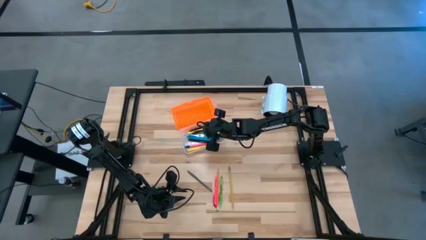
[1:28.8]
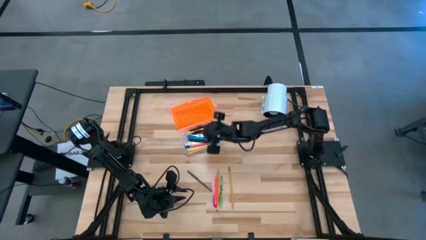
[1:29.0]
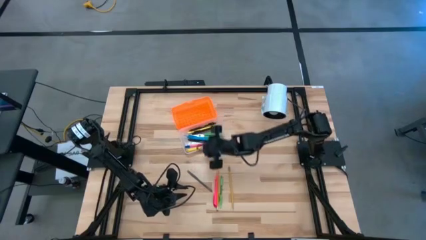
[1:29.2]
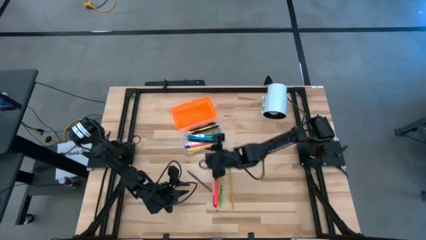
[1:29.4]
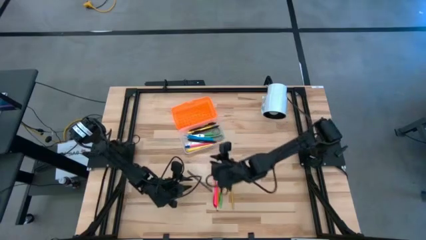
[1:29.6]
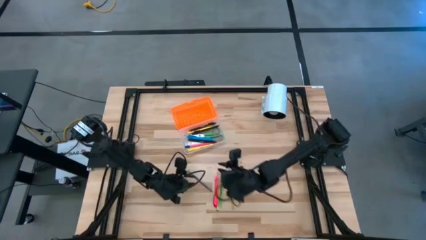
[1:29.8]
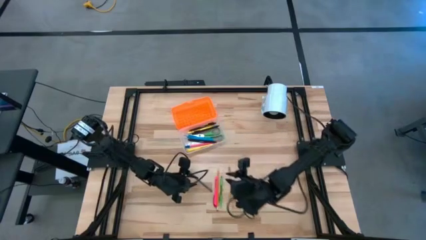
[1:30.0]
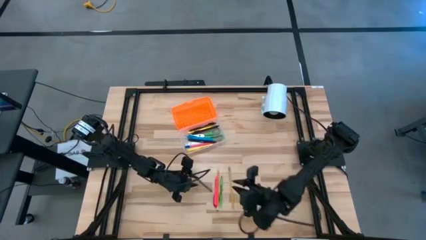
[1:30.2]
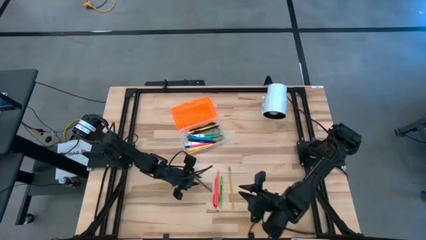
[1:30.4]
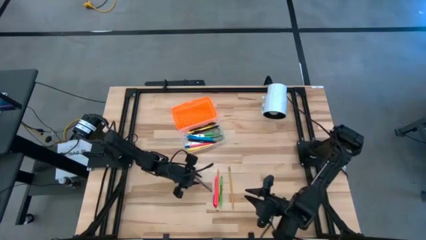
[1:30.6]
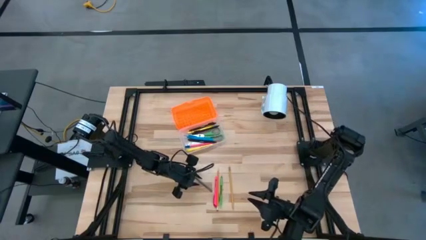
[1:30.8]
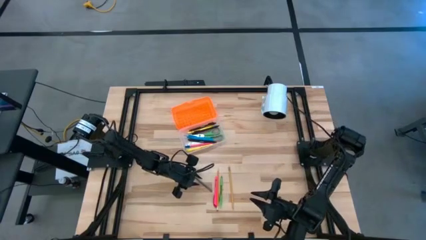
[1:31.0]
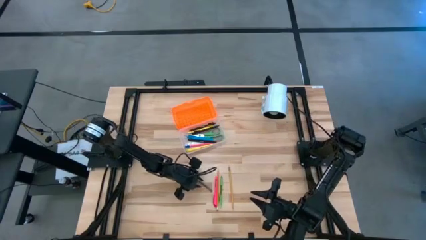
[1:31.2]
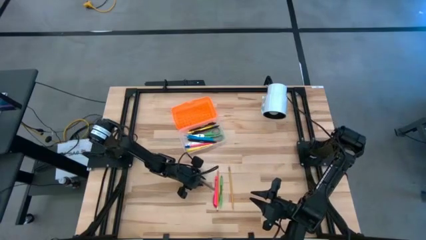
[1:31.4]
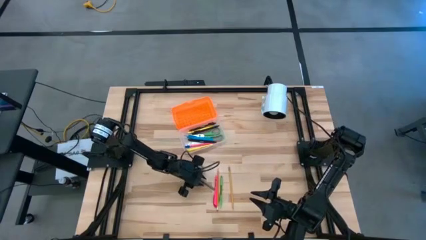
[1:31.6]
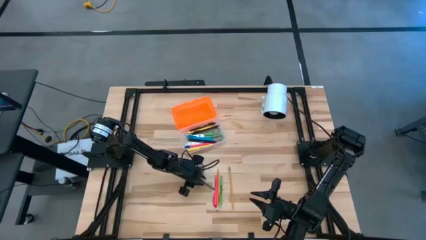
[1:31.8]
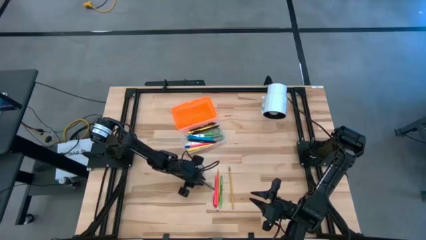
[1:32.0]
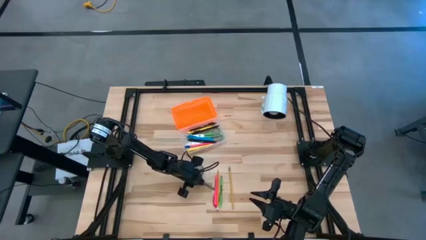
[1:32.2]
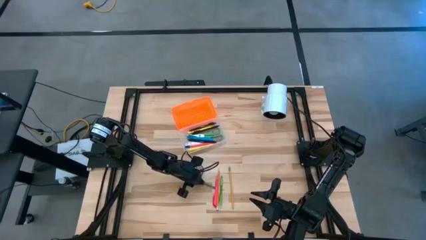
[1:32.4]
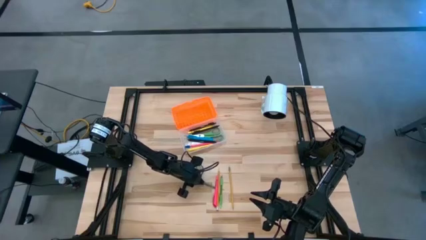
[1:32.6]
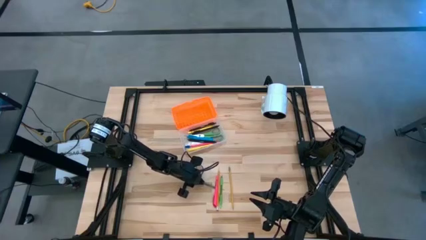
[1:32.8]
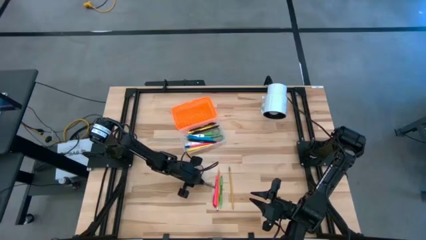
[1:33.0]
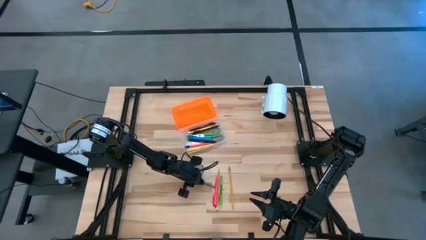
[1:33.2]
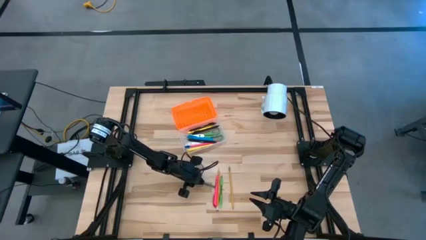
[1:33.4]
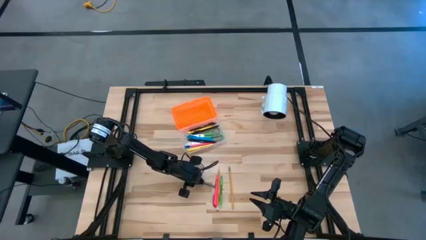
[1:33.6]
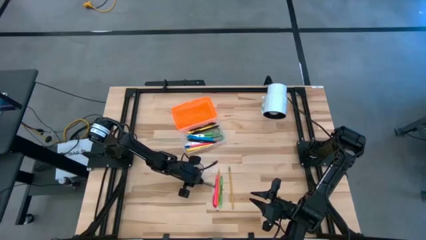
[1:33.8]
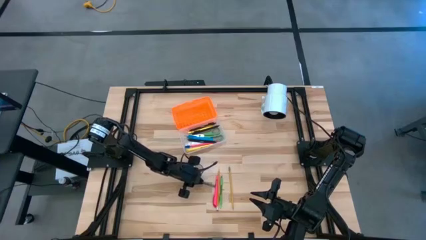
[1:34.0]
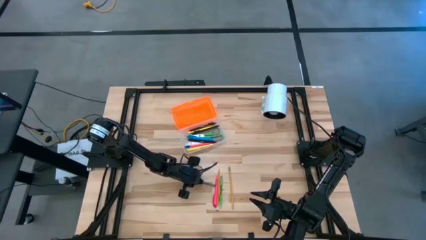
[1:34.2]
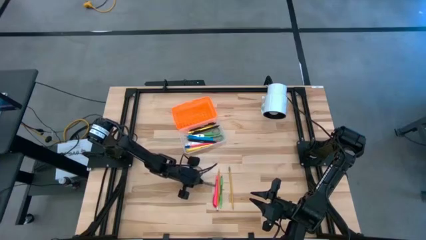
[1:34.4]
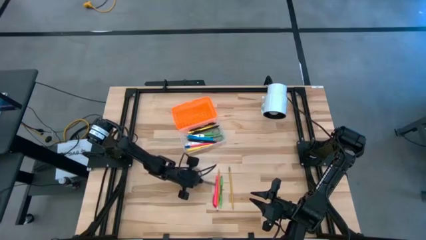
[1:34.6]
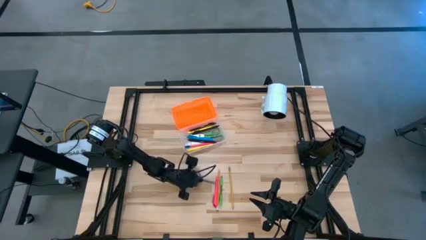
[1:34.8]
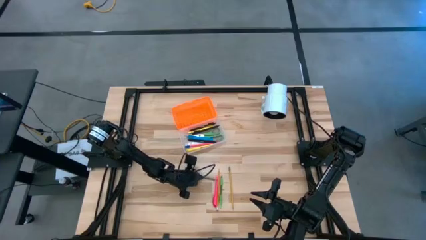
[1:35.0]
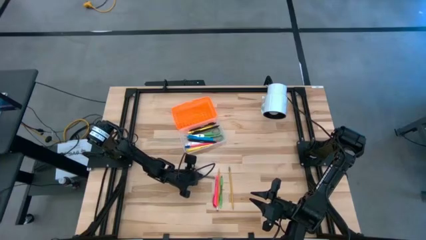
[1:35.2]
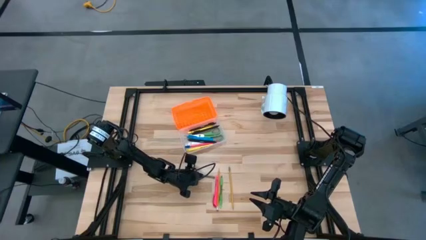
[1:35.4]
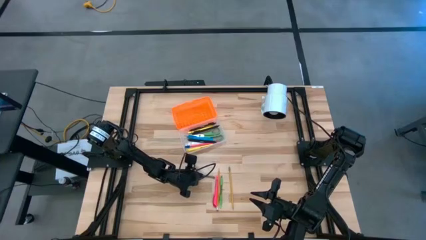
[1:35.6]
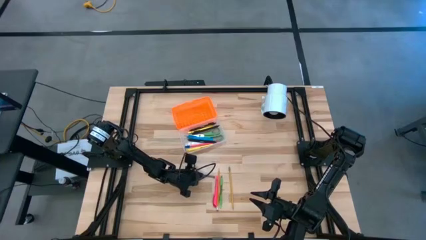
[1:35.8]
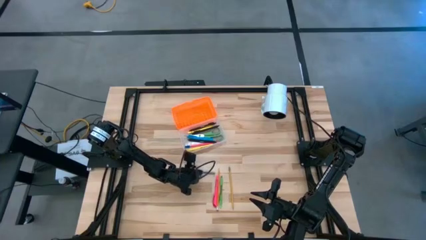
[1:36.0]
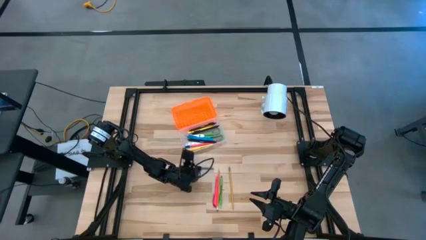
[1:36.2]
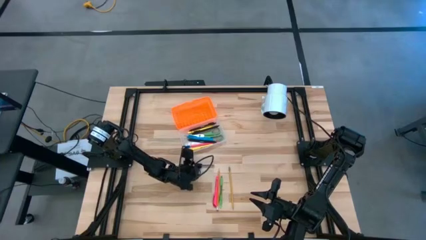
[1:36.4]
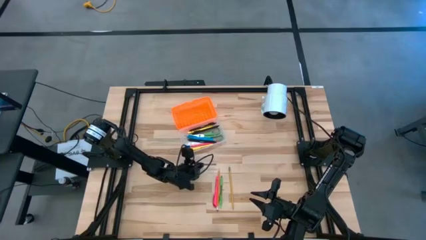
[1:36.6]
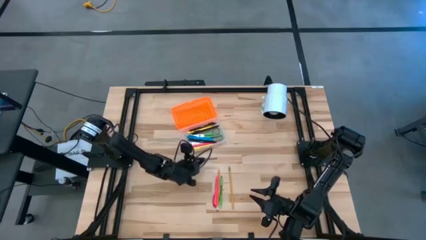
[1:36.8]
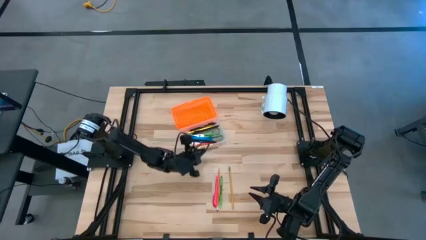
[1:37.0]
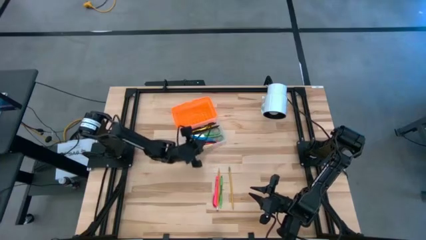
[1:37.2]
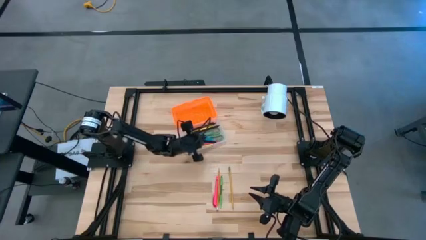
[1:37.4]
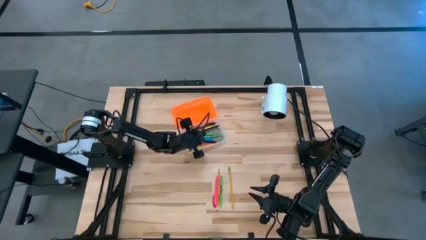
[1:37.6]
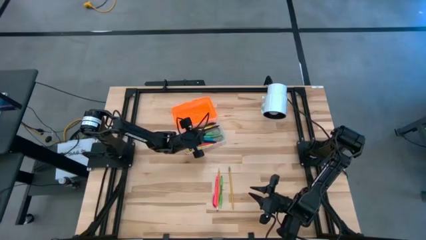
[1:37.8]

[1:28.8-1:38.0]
Task: Pick & place school supplies into a supply box
Put the gray pen into the supply box

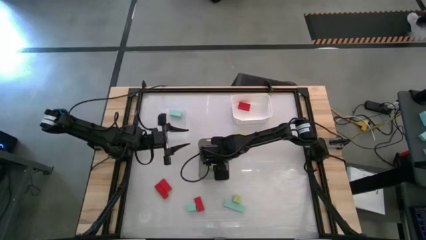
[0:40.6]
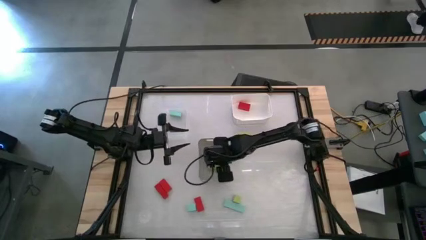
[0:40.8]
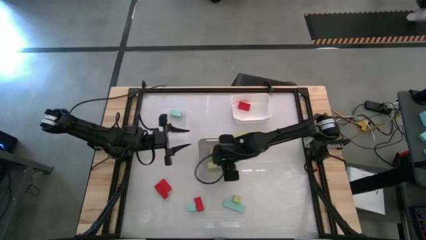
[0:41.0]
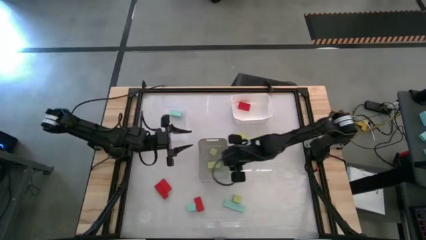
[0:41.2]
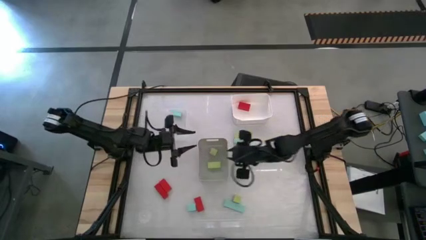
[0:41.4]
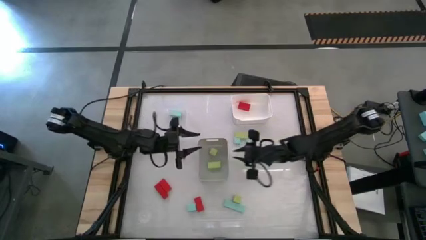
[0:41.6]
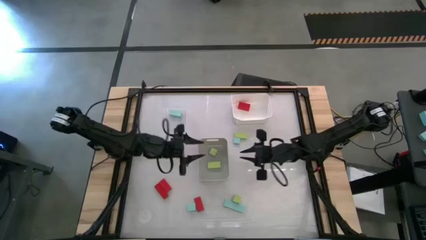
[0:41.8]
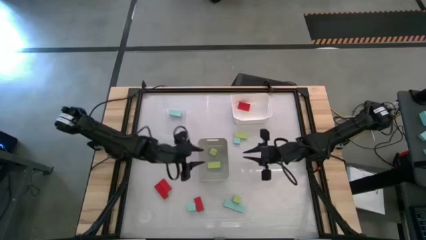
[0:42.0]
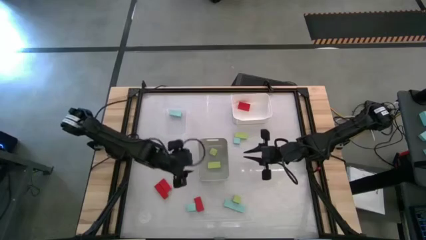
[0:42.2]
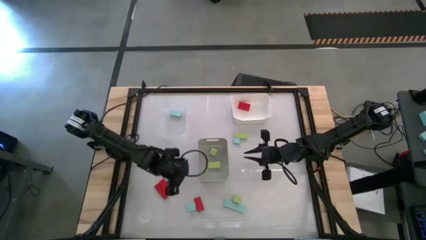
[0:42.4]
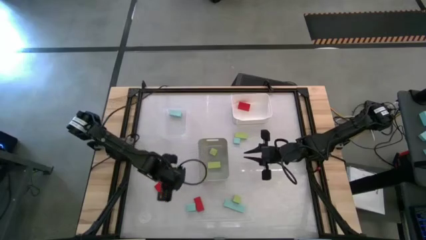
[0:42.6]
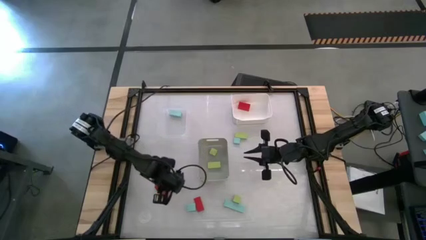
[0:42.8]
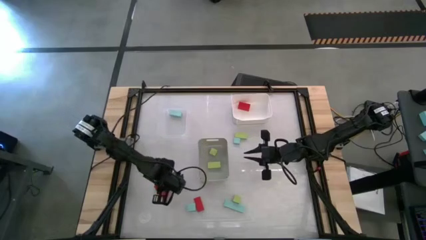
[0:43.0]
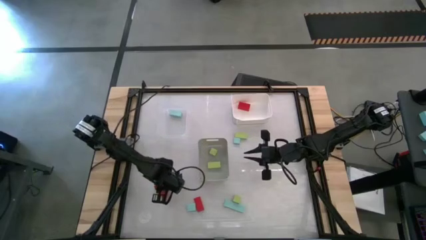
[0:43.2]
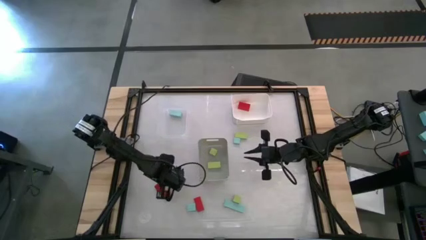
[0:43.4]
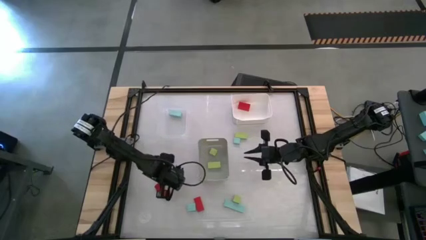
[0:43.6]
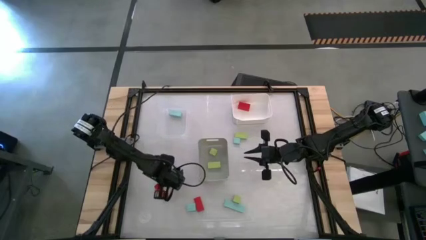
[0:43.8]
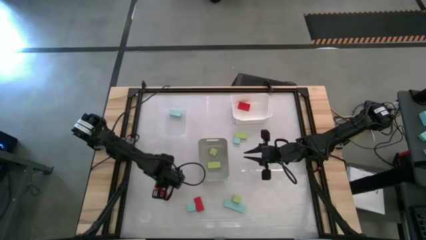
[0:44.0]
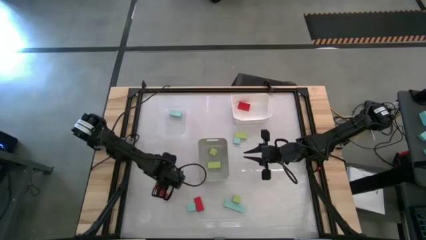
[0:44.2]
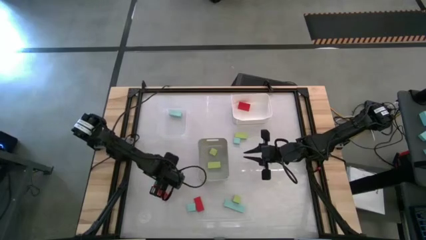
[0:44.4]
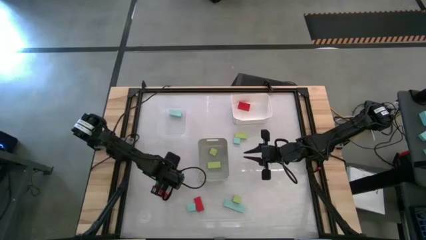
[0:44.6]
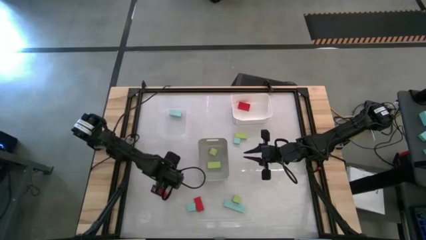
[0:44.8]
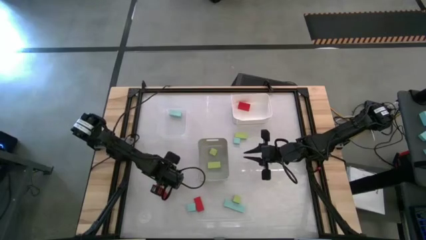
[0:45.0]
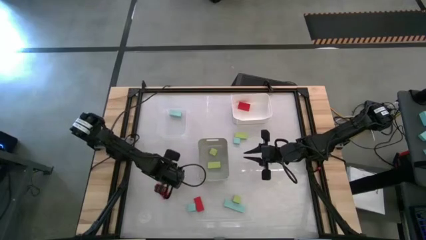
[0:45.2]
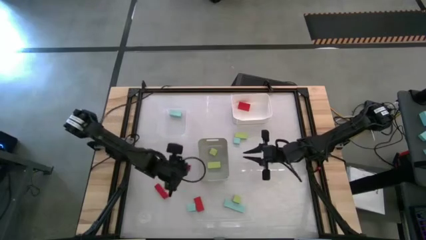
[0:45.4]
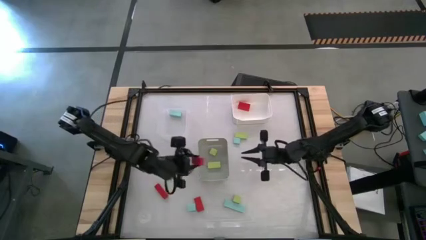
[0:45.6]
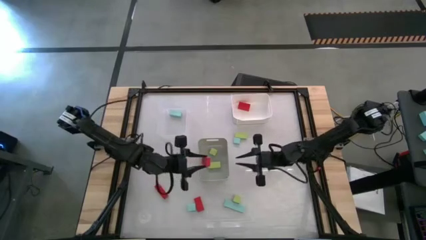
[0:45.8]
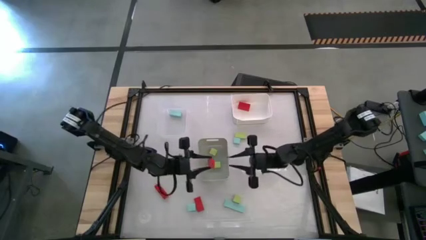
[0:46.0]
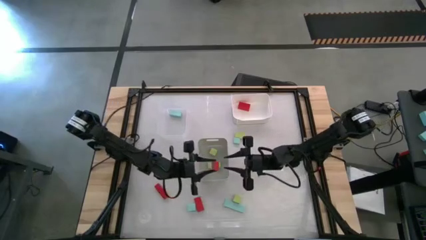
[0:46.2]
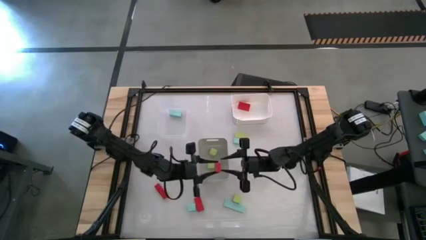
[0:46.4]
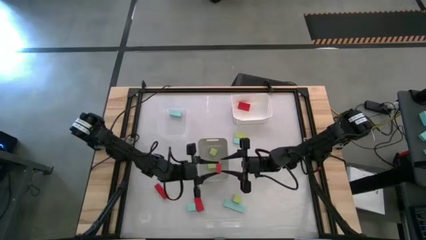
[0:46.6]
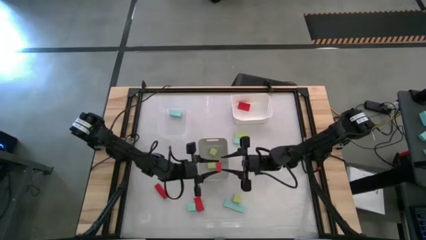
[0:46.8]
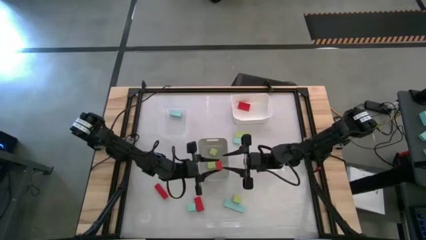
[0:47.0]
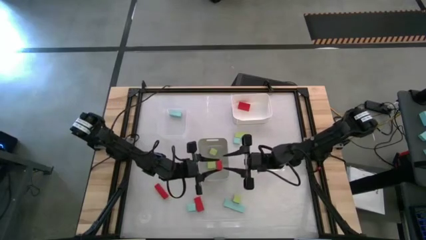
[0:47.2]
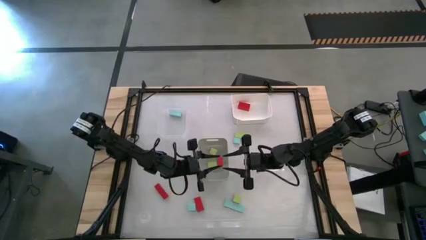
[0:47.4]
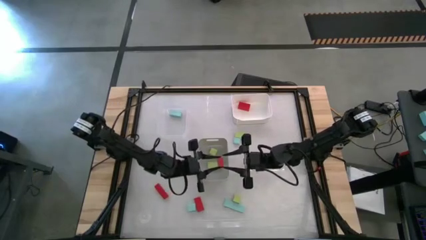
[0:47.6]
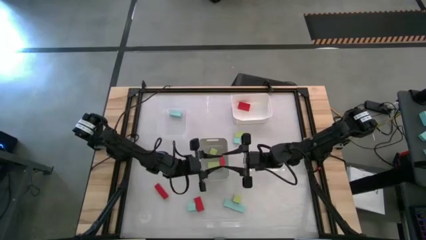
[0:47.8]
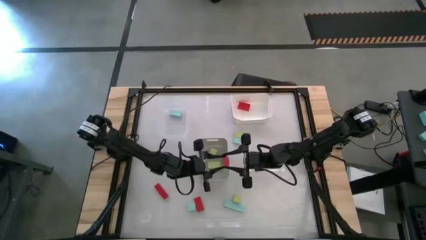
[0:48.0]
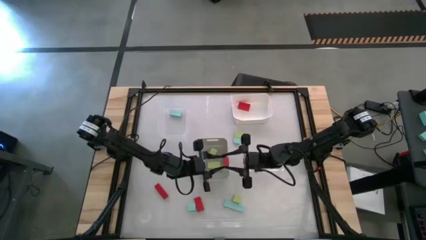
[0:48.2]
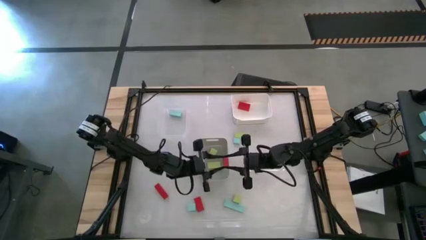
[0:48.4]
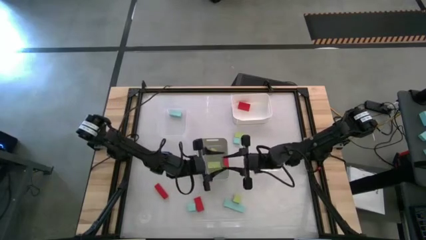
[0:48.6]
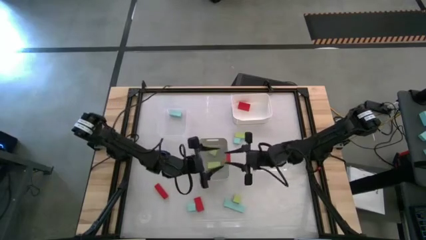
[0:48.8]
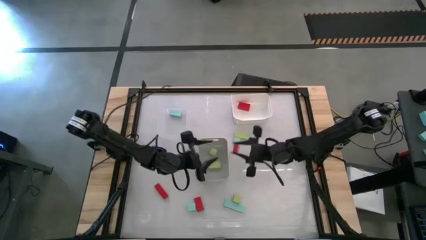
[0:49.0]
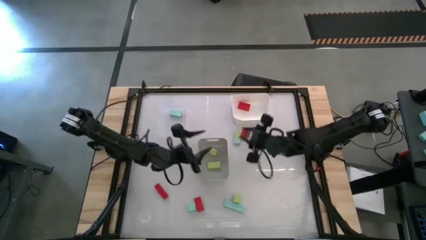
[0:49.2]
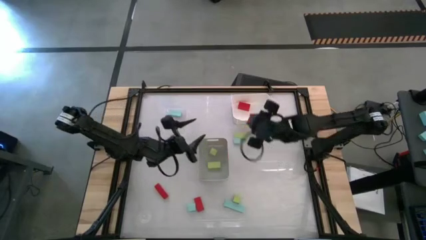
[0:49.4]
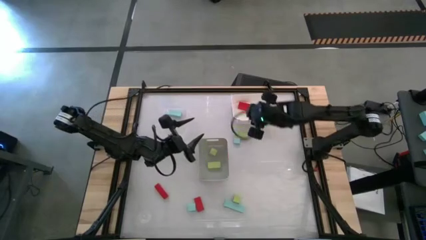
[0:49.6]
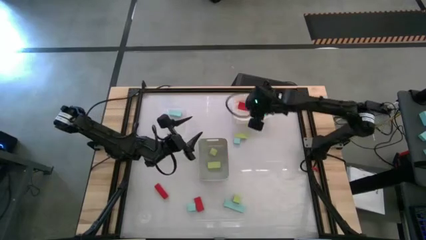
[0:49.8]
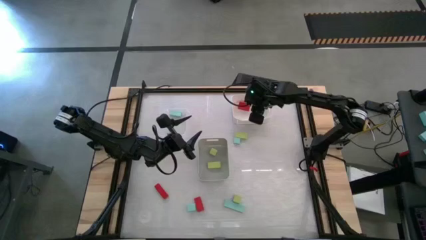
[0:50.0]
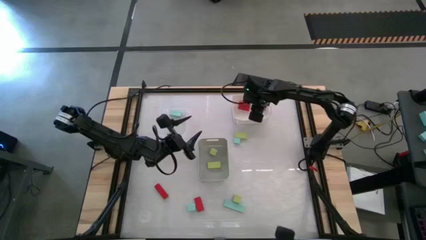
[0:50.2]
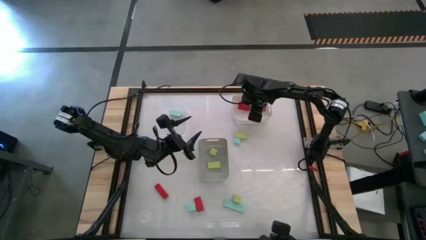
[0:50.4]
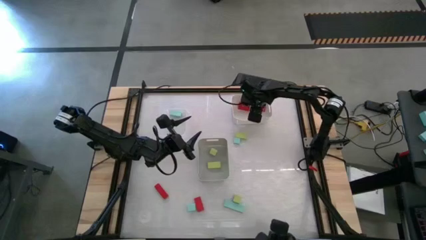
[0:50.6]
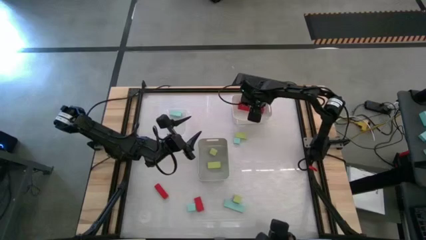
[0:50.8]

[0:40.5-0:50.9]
Task: Sort & place blocks by color
Put the red block into the white bin
